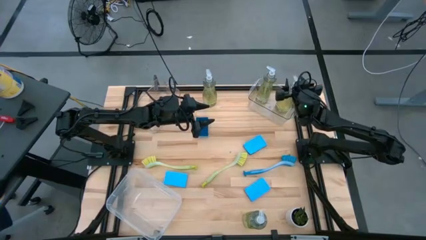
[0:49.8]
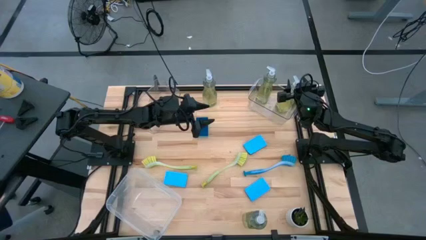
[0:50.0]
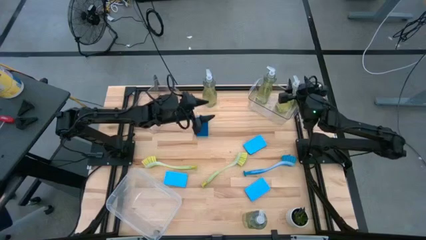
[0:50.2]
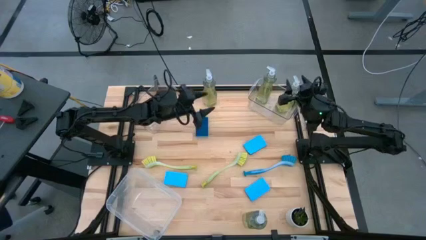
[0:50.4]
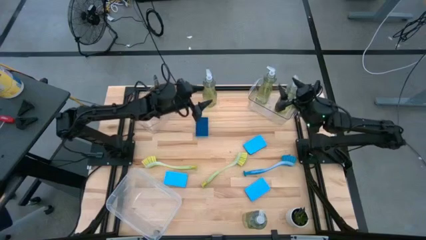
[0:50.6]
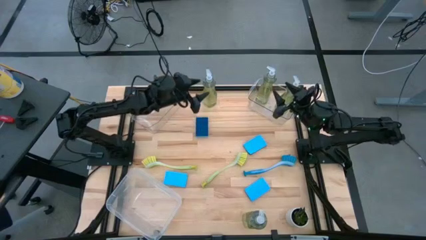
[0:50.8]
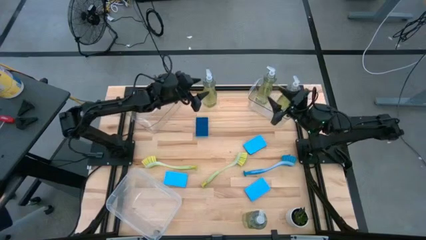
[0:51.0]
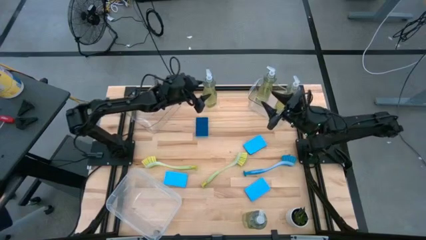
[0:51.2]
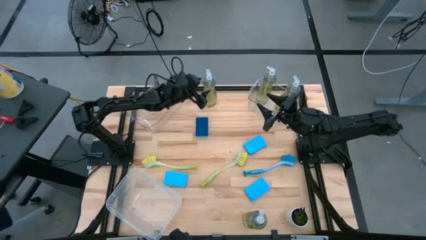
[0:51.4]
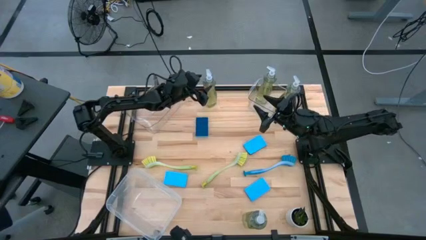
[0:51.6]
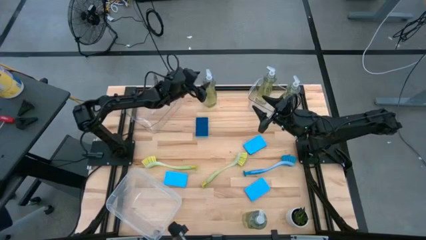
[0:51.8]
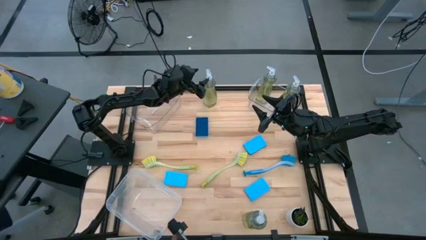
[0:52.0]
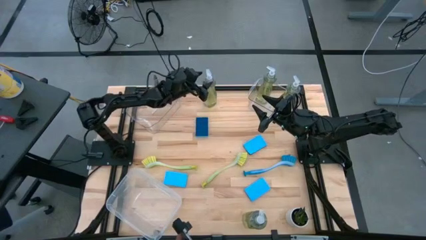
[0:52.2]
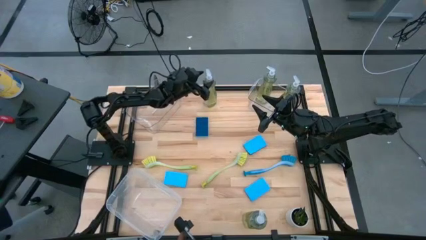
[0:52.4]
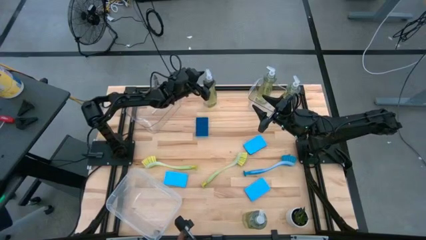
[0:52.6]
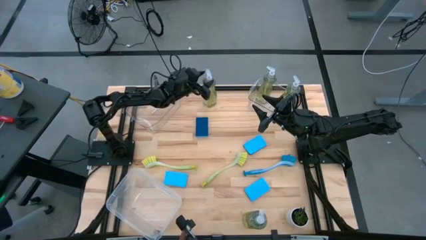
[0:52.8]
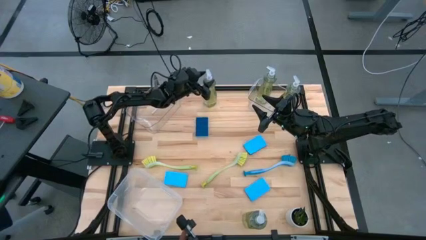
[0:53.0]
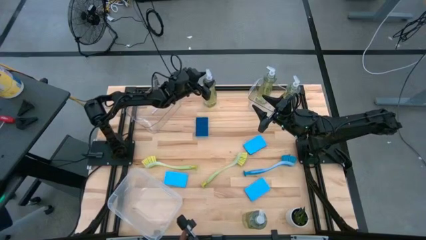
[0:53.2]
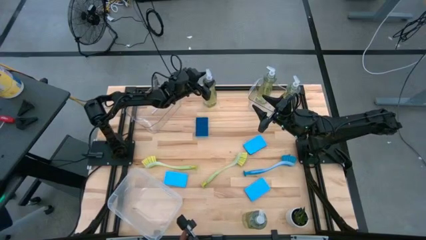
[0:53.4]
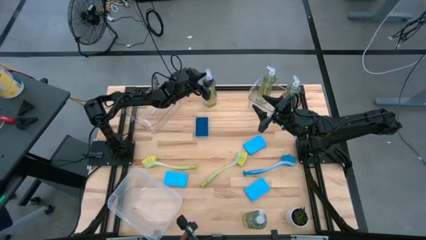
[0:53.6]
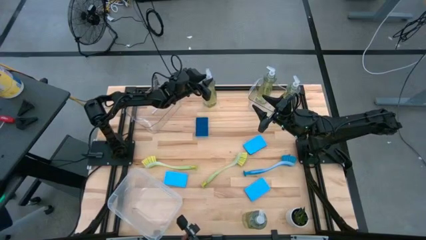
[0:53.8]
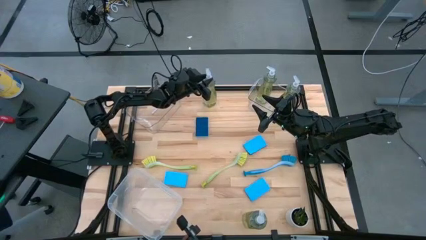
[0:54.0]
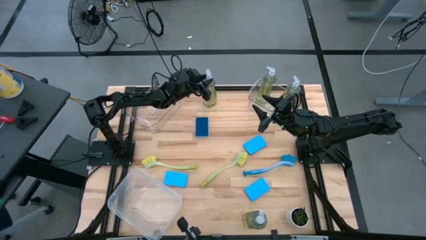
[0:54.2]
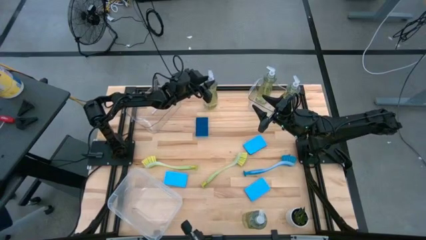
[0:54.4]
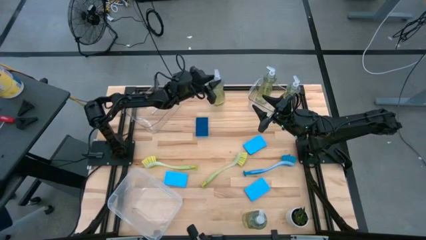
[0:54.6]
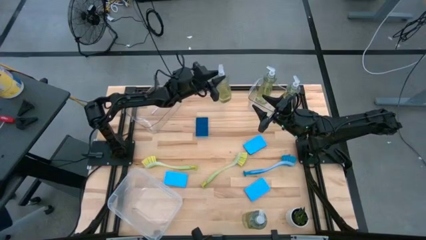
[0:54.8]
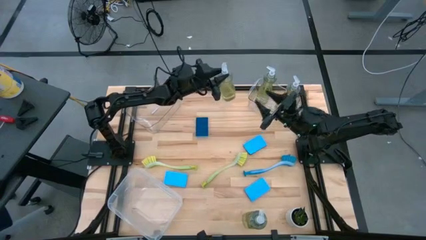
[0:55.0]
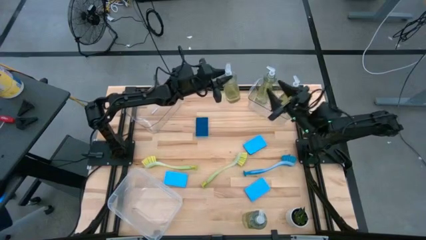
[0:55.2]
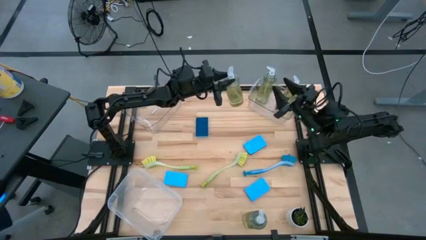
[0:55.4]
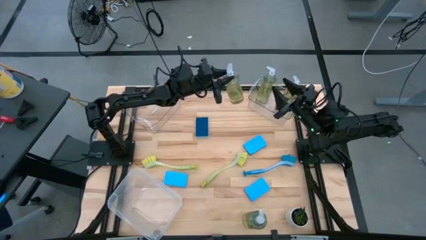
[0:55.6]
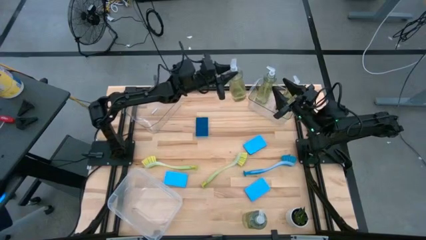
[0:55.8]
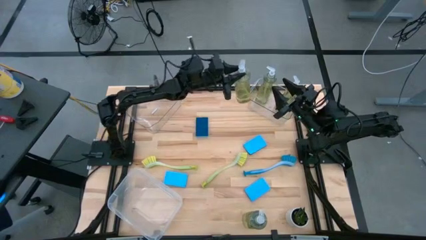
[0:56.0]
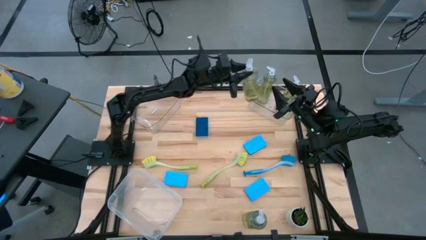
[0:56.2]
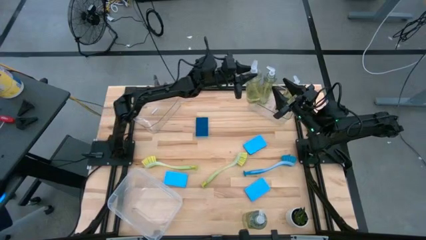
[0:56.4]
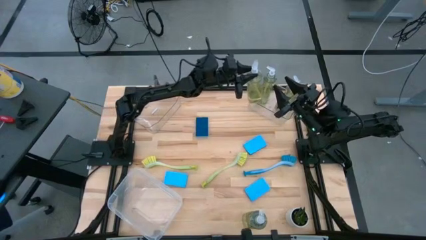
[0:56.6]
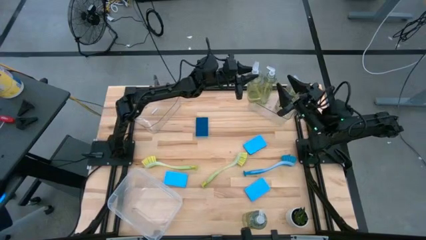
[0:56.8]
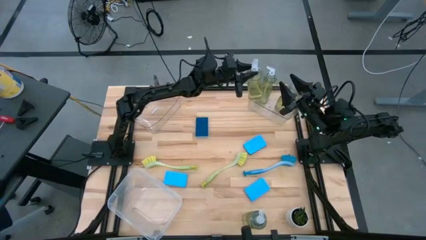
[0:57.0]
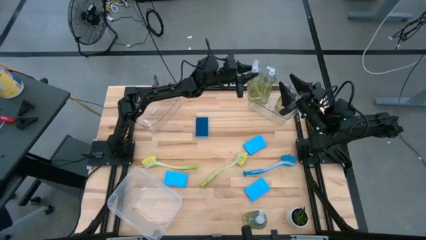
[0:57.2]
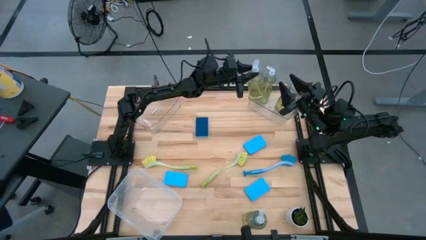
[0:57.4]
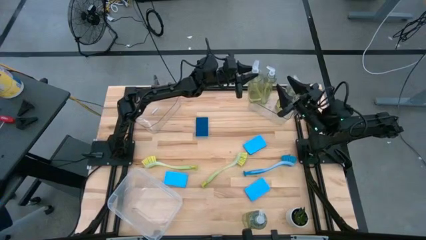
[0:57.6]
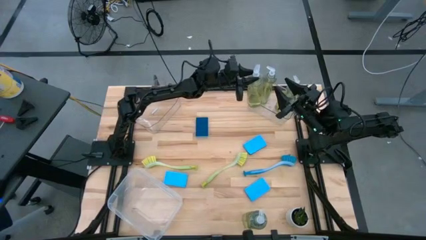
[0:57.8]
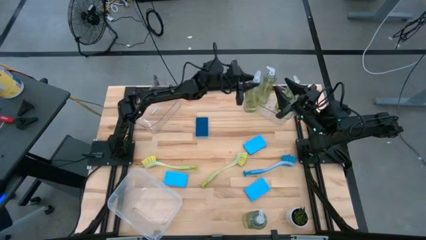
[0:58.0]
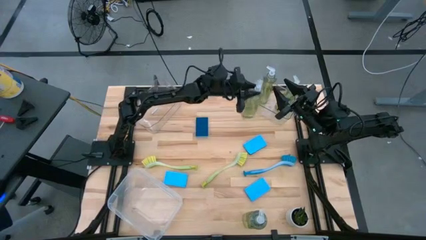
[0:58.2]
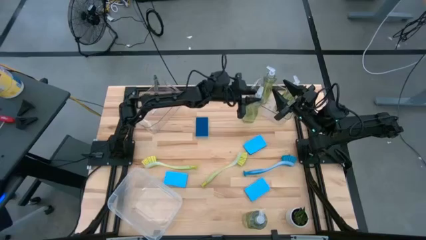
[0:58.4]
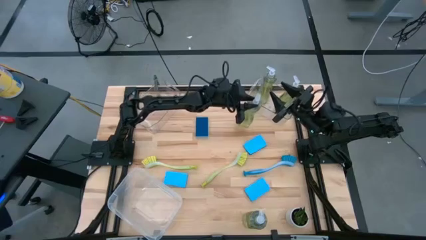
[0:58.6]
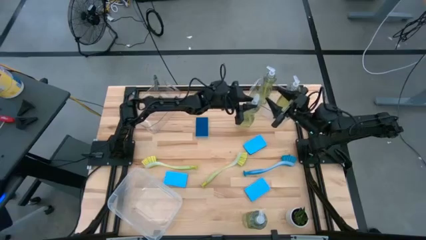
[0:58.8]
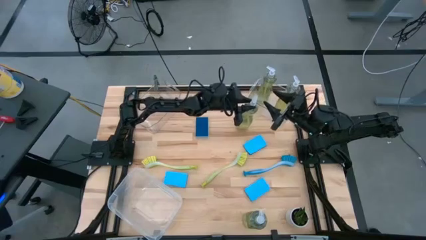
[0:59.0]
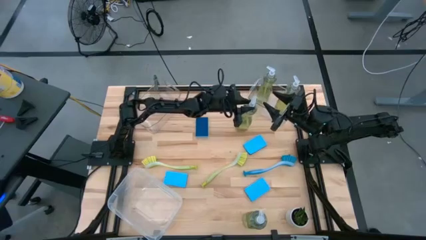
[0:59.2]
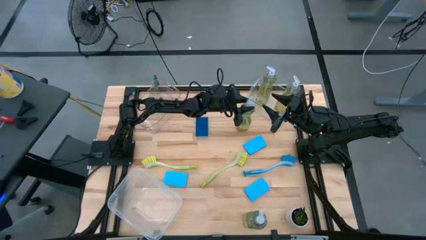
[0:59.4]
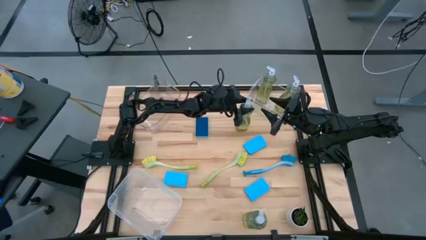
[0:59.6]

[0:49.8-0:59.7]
Task: Pick & Place Kitchen Sink Supplies
Put the yellow dish soap bottle into the right transparent bin

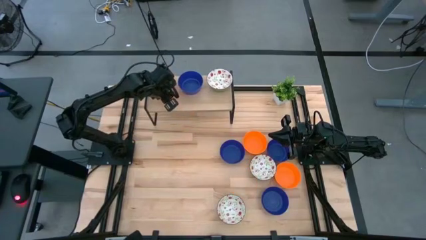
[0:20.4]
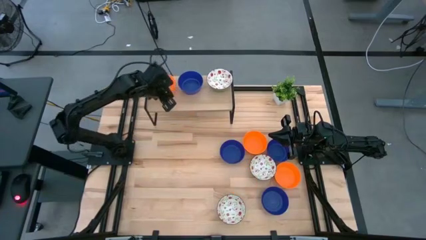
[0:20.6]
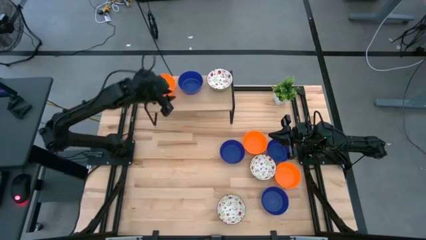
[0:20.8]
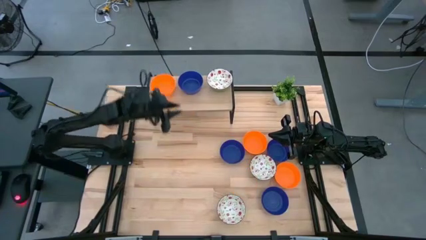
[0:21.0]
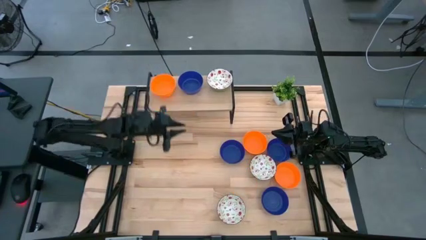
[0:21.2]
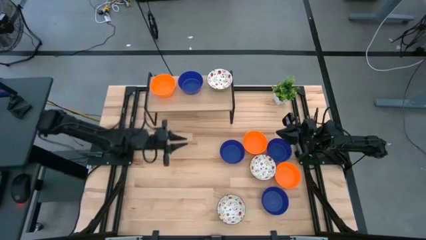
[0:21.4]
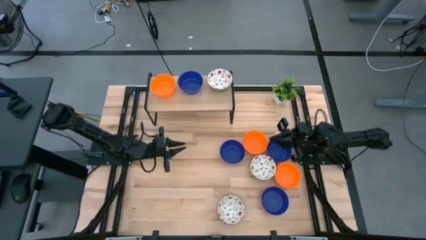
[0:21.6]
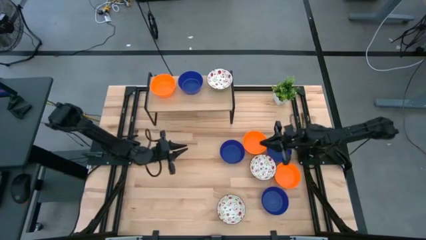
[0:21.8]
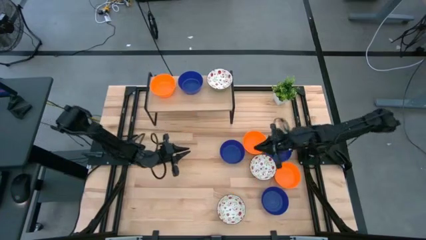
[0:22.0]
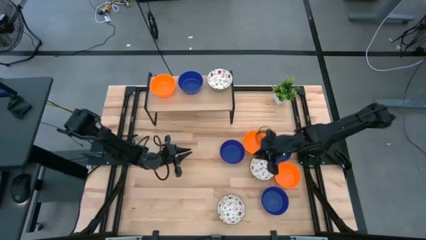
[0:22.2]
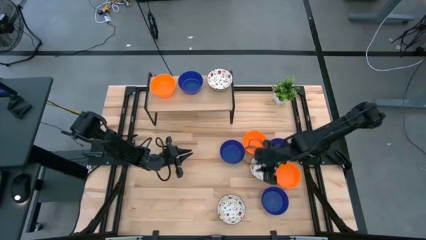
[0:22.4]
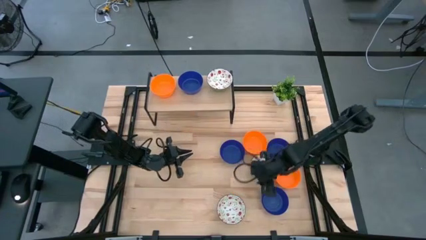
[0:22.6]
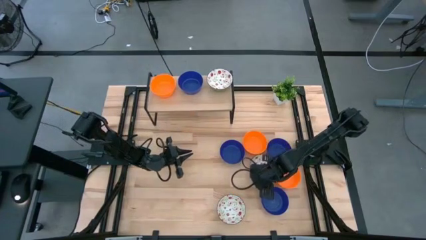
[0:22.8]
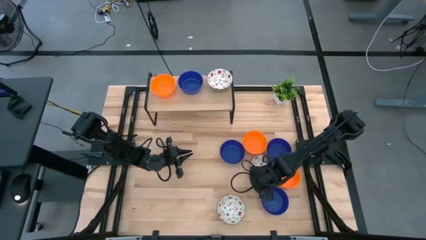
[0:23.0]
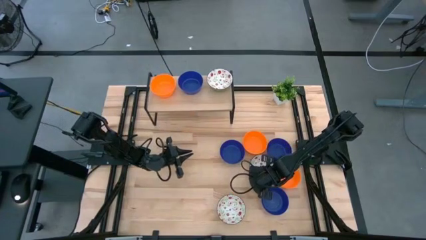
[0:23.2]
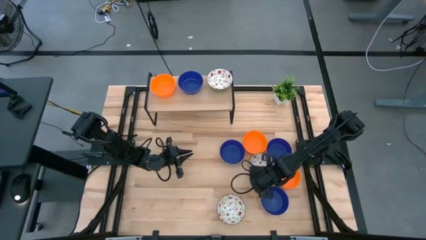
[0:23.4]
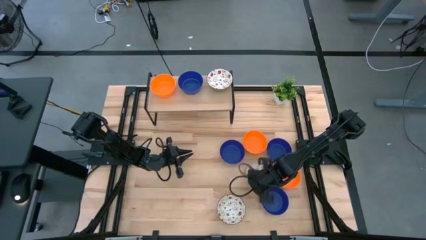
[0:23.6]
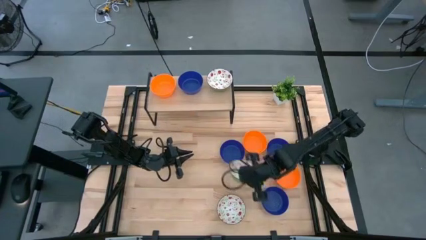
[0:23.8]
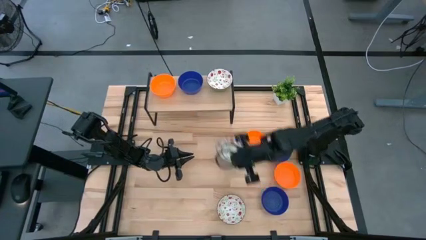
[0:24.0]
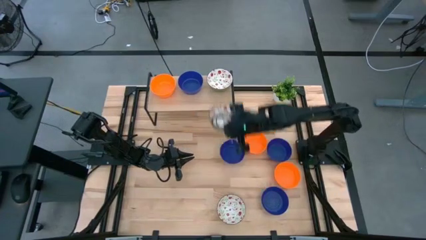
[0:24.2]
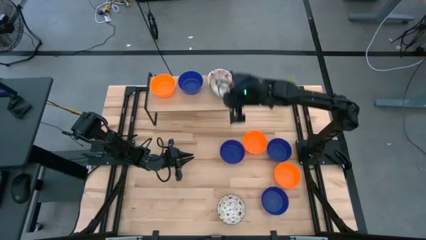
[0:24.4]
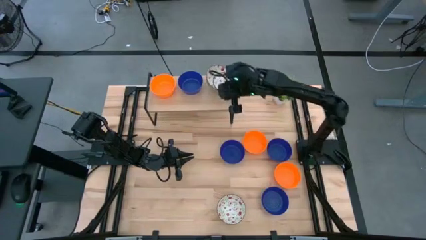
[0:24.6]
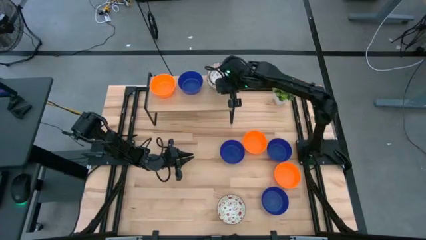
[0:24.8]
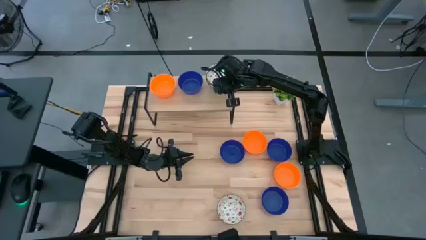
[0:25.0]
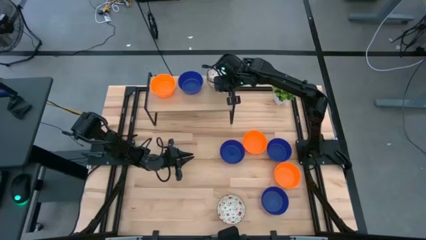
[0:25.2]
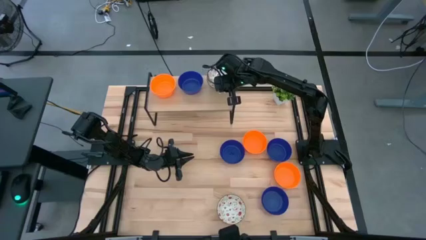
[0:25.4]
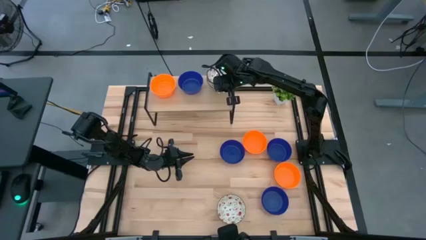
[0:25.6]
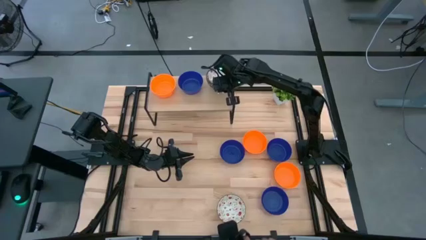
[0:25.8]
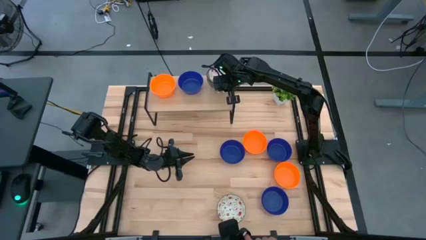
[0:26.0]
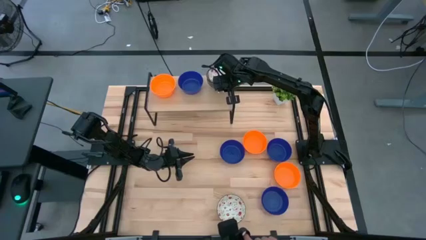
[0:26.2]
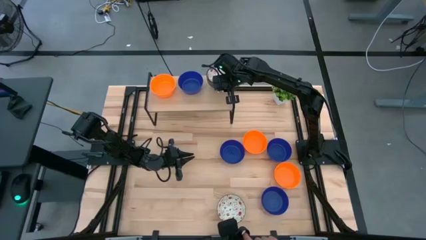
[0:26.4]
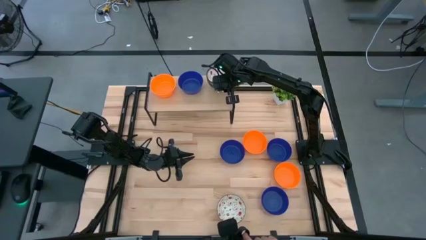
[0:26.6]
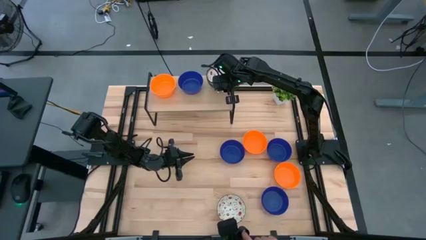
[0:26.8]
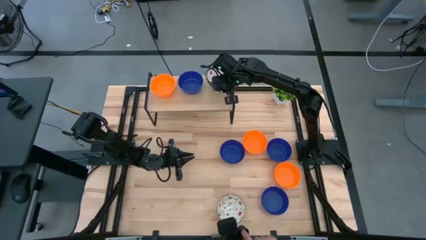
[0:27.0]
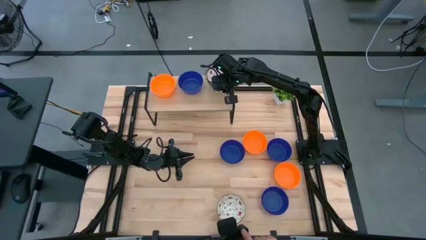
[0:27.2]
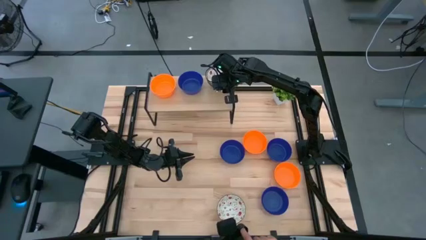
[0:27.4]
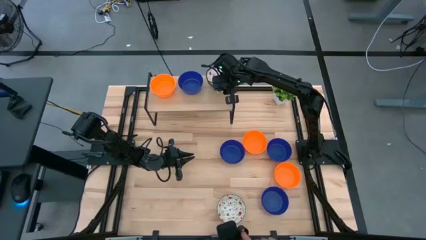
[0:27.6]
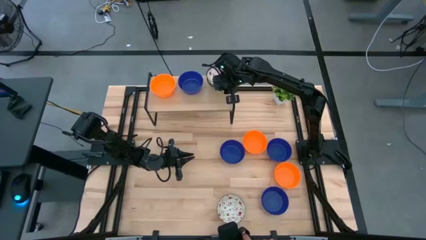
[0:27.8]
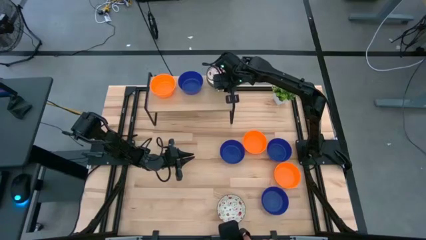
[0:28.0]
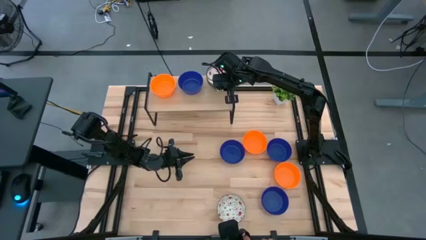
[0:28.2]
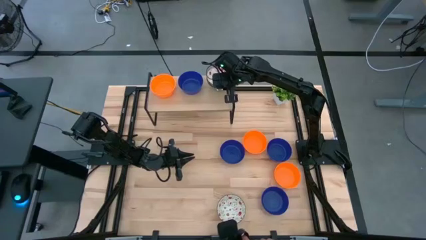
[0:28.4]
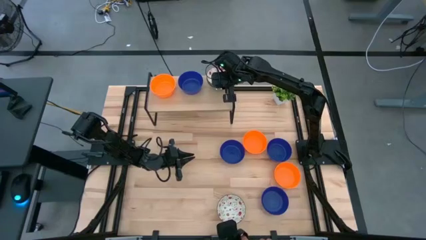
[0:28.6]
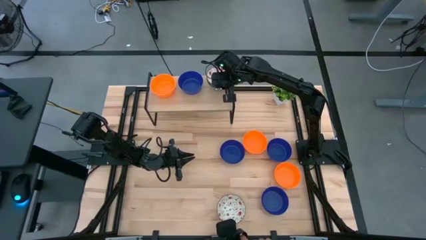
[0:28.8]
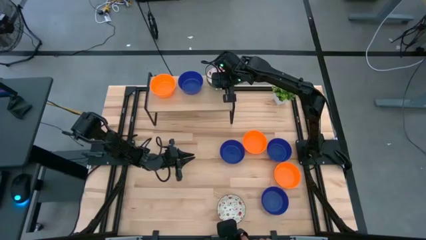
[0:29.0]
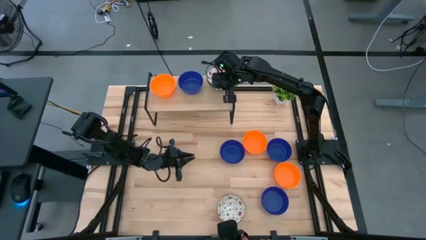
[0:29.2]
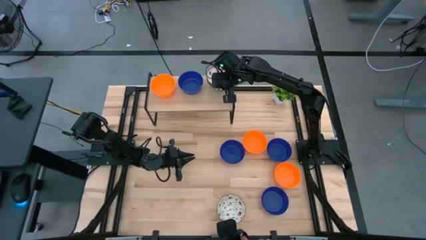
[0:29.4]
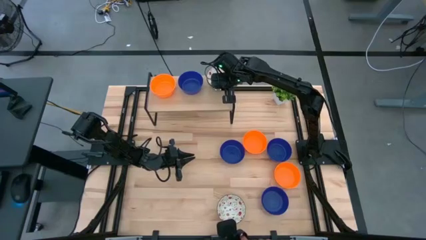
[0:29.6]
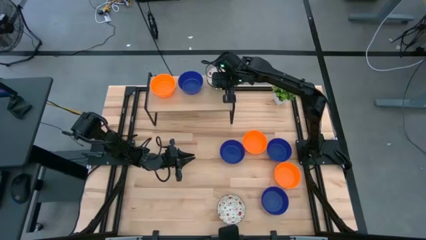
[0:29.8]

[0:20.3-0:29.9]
Task: Pick & Place Mini bowls
Stack the top white bowl on top of the other white bowl on the shelf
